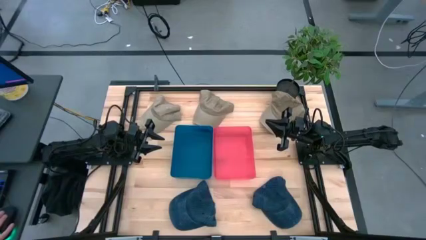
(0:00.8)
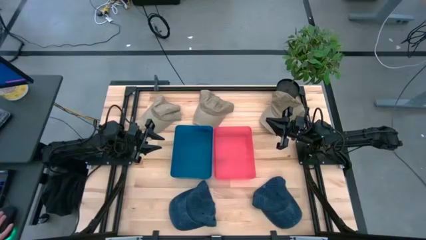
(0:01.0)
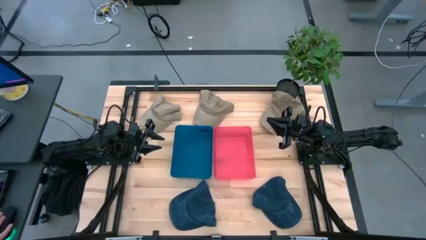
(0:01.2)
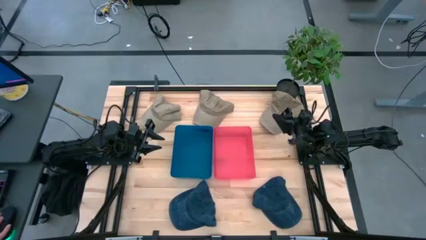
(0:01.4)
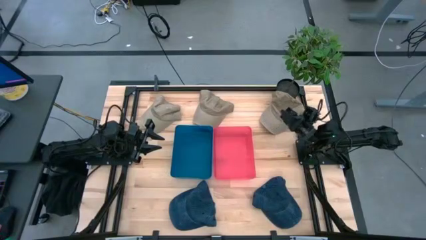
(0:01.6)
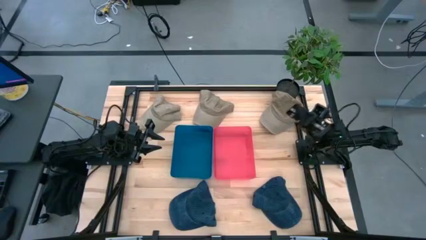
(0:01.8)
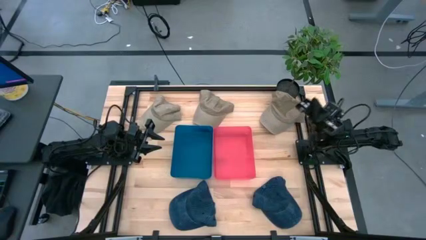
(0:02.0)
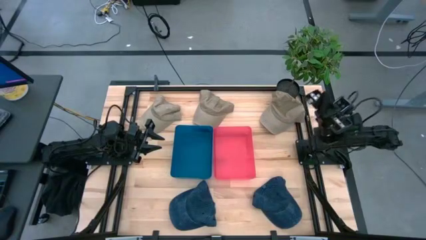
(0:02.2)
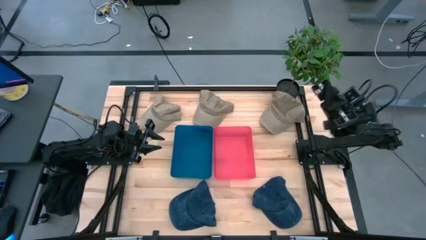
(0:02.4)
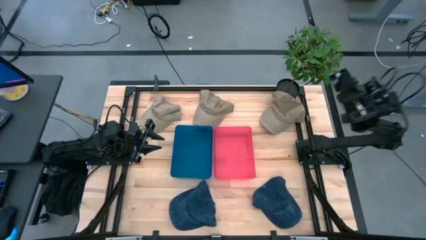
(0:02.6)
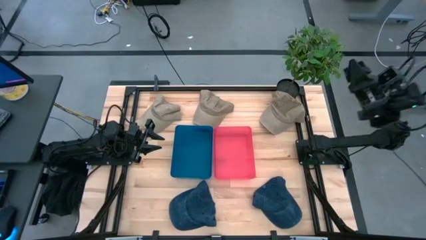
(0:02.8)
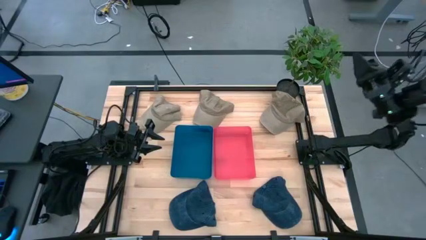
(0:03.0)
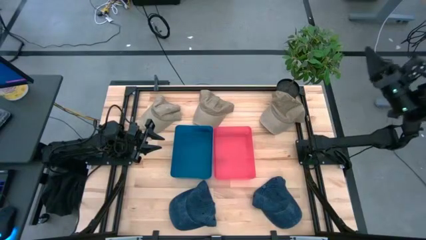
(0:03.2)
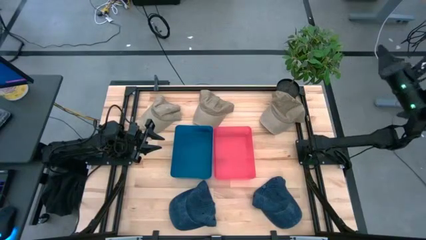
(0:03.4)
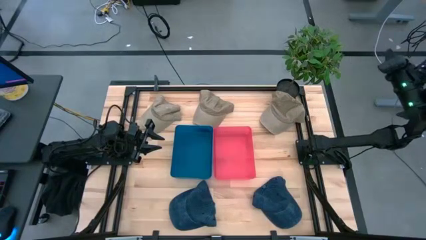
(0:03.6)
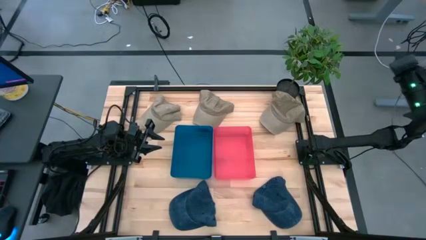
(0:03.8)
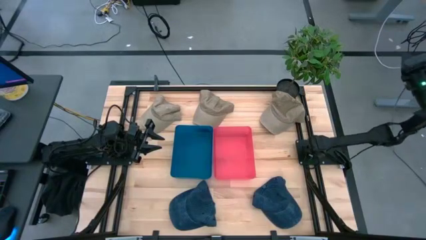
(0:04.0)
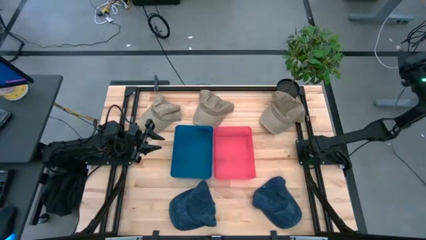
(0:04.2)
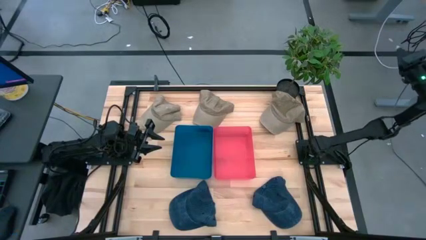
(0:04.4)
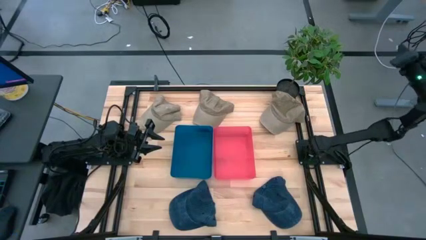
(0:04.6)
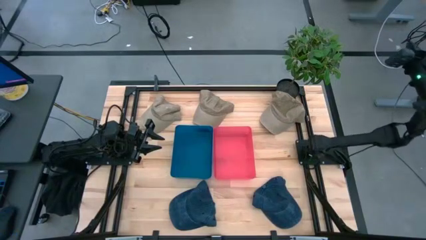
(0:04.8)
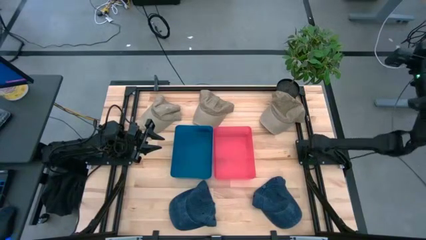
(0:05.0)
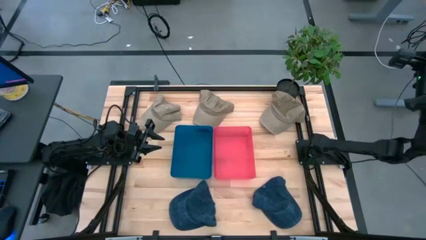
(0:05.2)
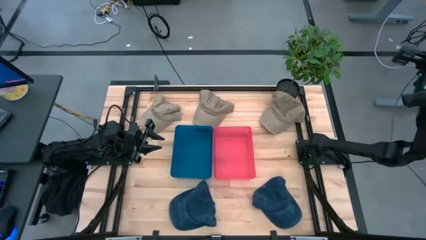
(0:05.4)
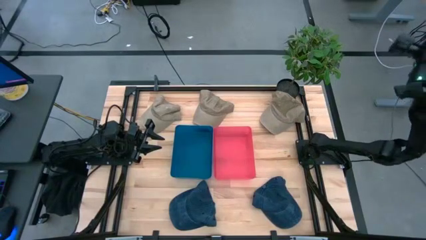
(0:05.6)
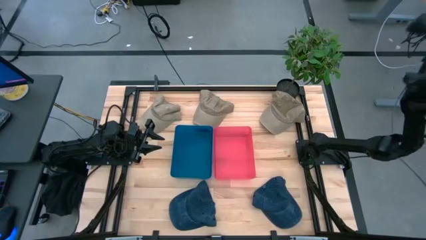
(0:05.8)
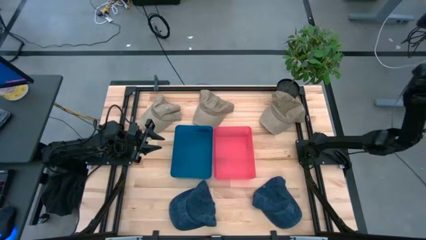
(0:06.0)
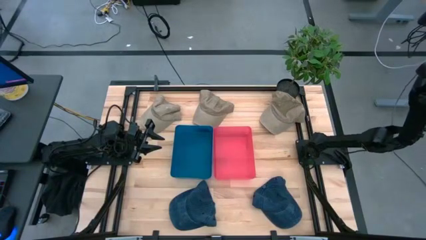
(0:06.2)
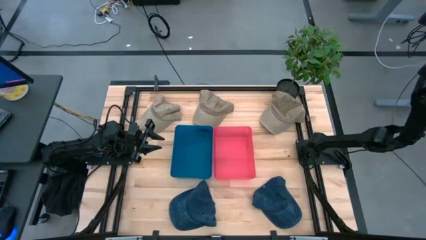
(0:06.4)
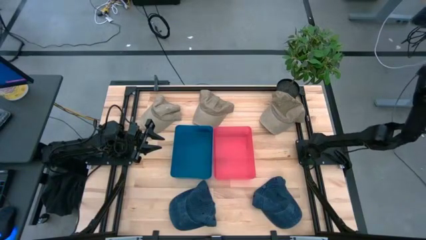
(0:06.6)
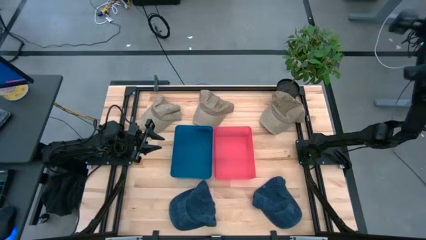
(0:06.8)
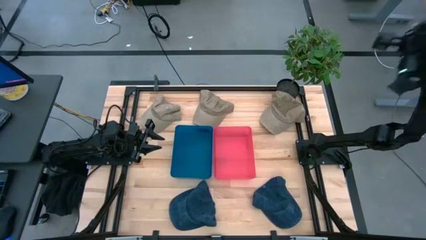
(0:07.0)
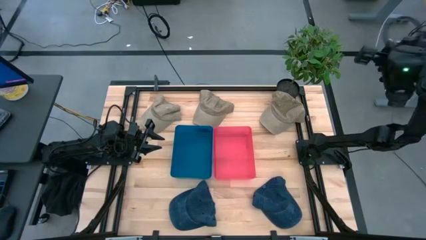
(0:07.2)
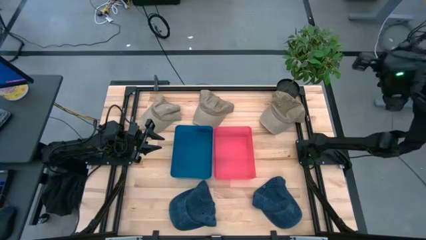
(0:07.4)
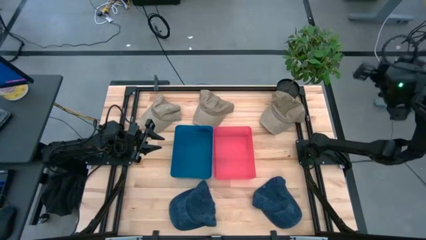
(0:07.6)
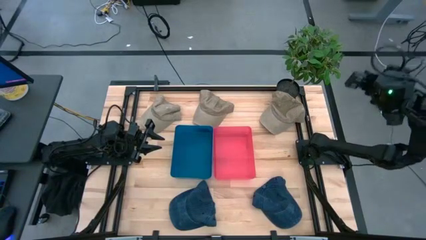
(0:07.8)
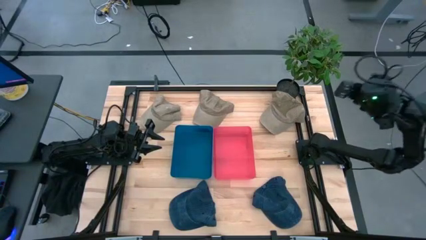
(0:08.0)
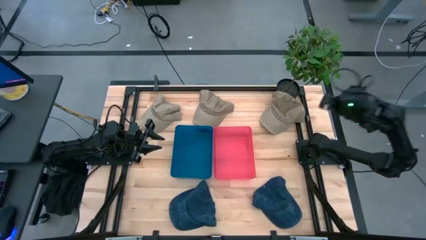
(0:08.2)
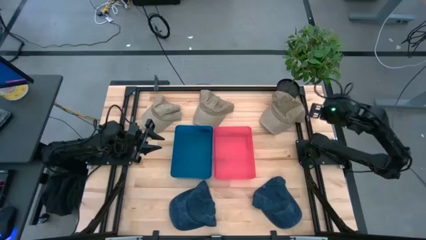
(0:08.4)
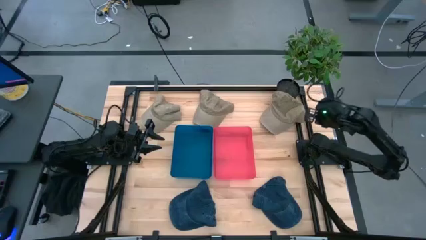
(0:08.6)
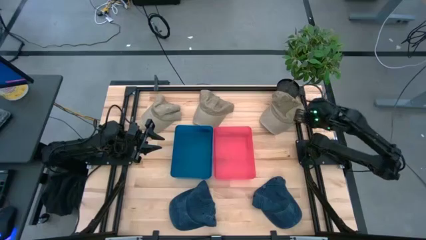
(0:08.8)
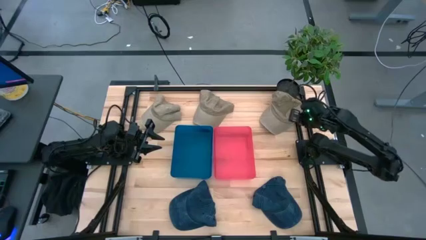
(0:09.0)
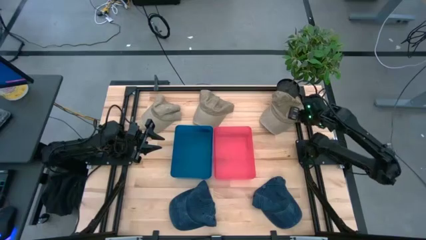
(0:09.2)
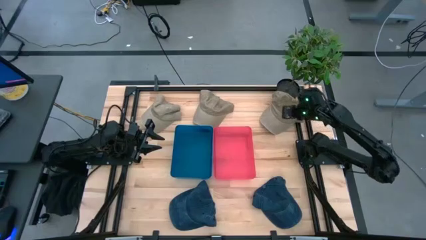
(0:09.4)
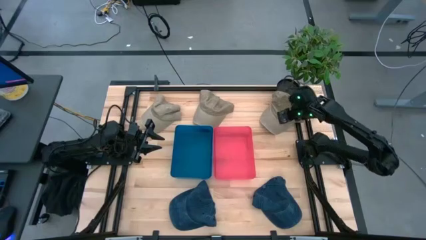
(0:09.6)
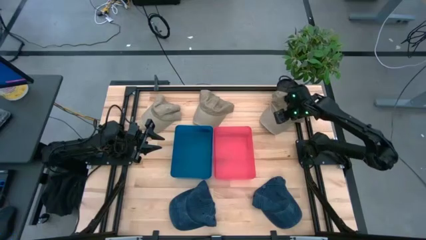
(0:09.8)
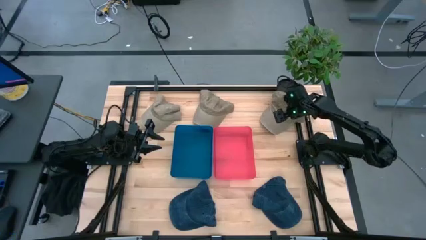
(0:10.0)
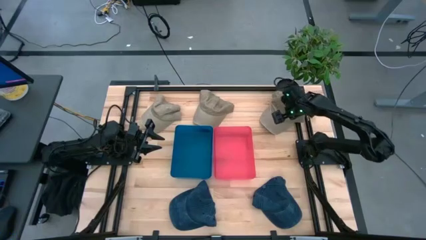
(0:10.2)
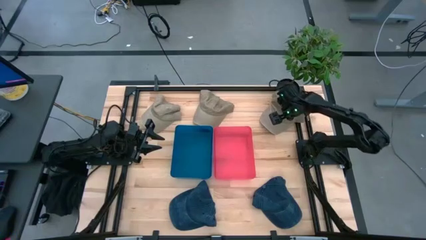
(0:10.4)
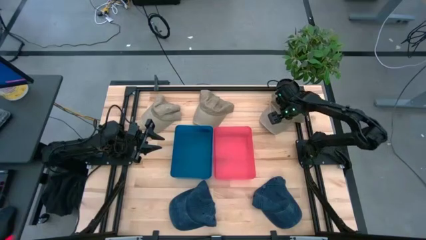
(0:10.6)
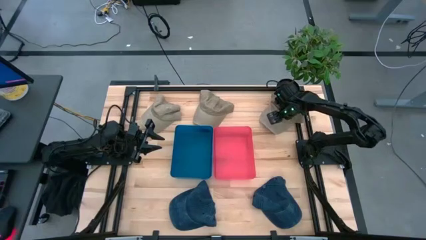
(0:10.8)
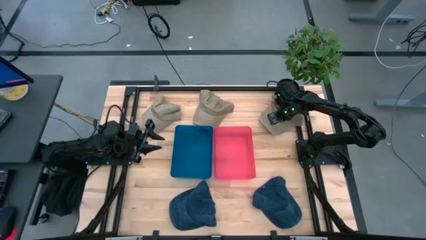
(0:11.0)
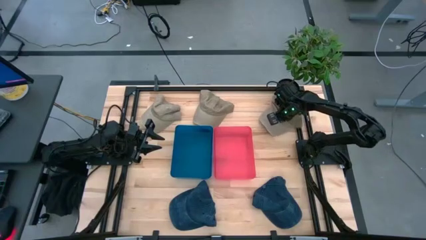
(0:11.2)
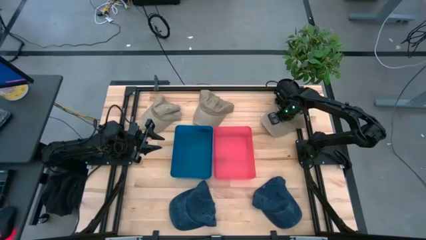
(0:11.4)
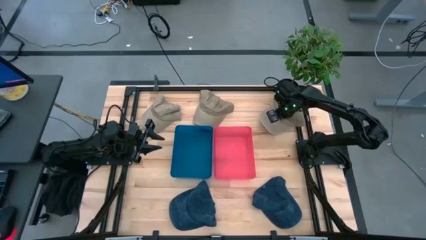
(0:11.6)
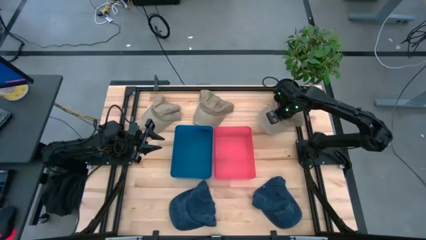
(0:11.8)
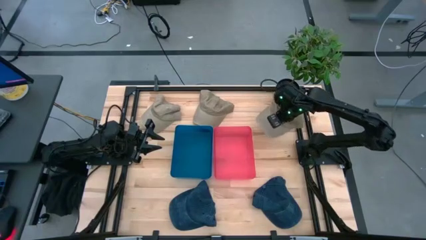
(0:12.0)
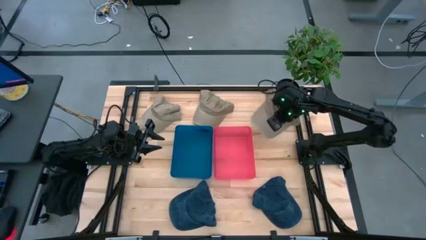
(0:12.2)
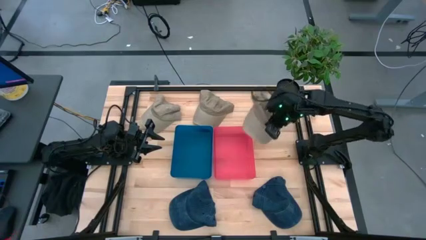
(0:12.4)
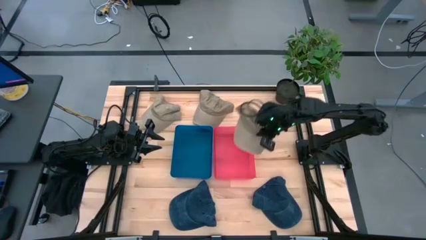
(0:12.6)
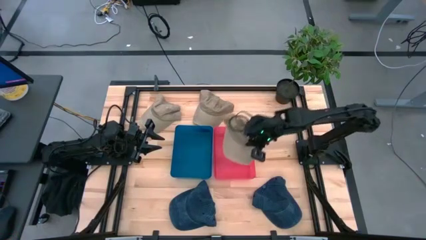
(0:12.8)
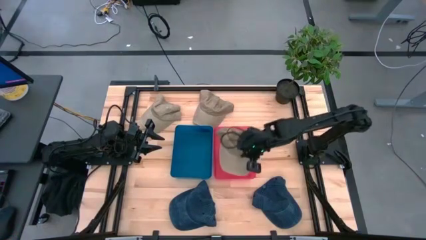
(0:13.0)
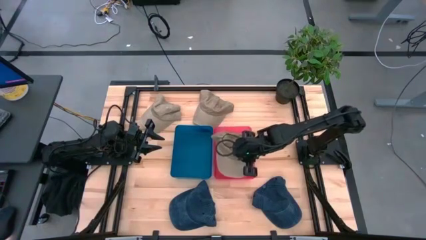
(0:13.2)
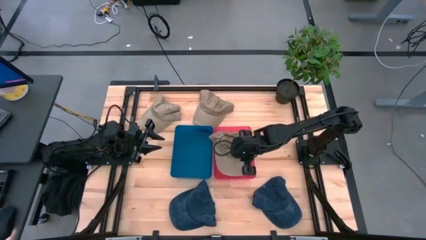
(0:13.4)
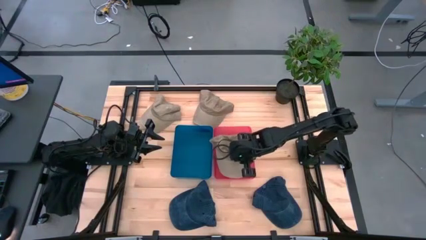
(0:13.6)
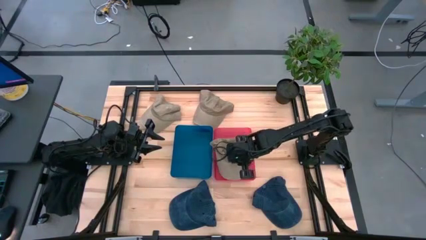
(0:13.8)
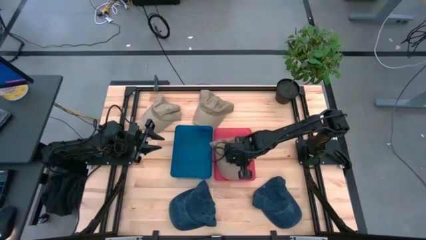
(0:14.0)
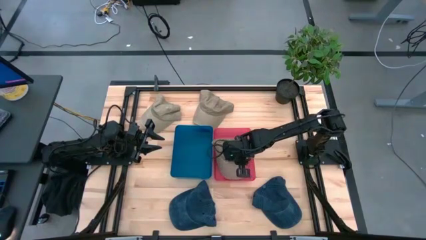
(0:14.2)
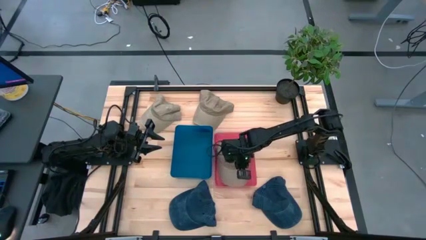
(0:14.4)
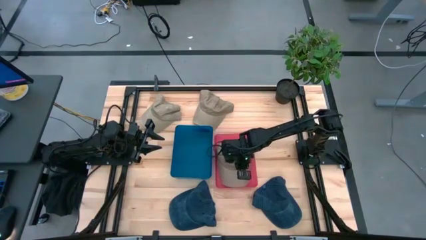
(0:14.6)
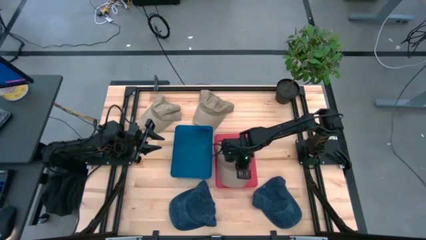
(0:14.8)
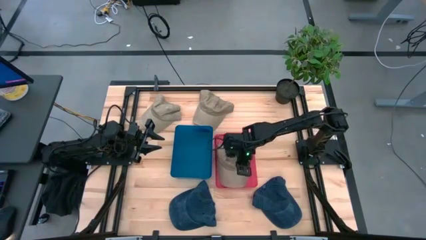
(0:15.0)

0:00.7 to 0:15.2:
Task: Pick & Place hat
Put the brown cap into the red bin
